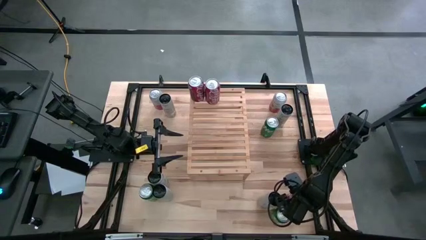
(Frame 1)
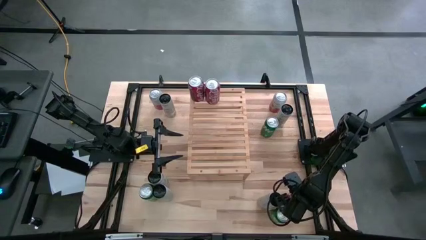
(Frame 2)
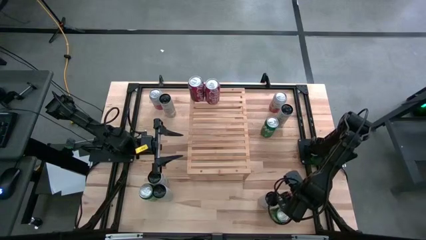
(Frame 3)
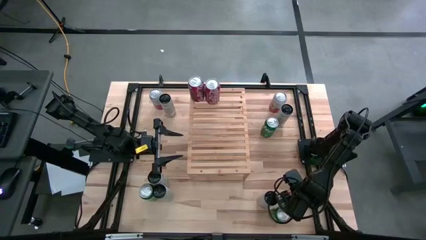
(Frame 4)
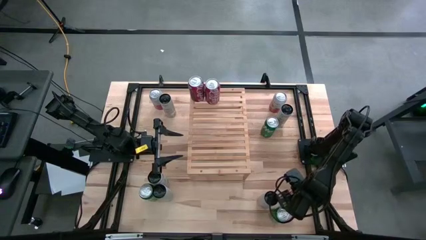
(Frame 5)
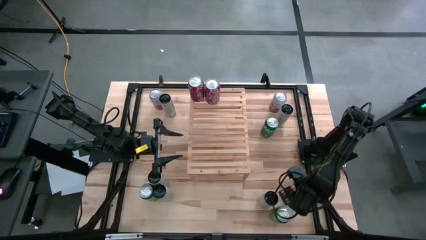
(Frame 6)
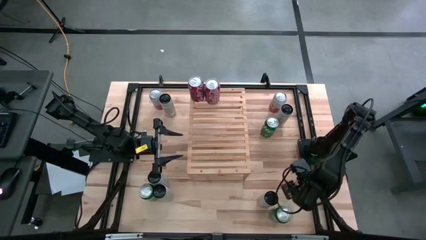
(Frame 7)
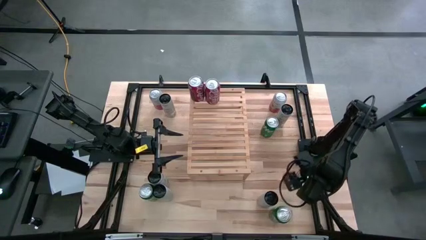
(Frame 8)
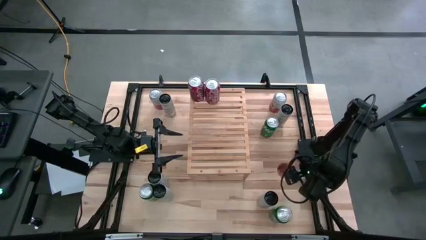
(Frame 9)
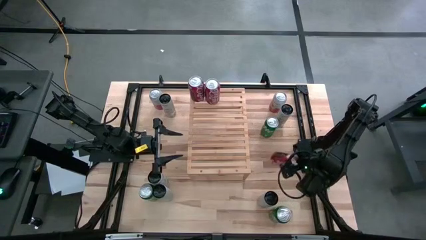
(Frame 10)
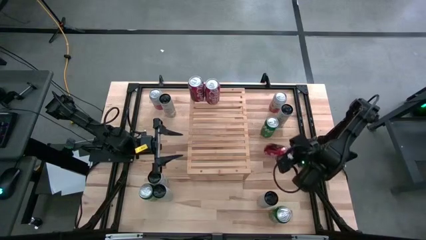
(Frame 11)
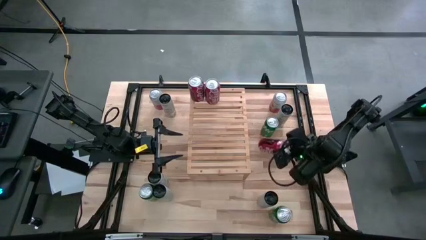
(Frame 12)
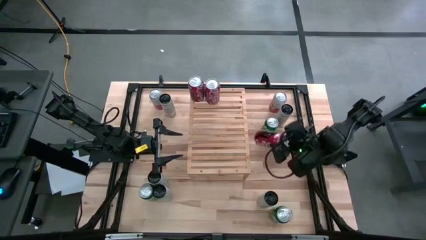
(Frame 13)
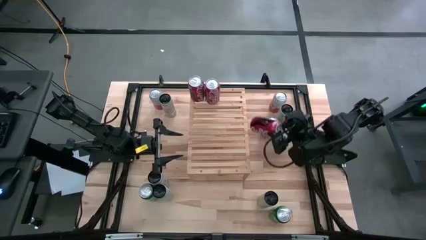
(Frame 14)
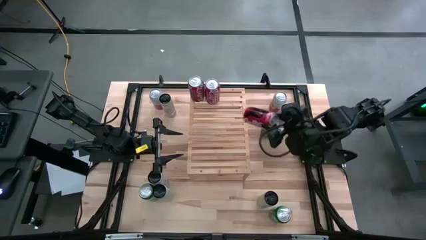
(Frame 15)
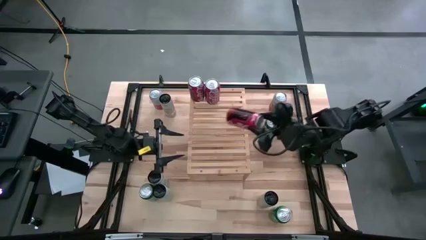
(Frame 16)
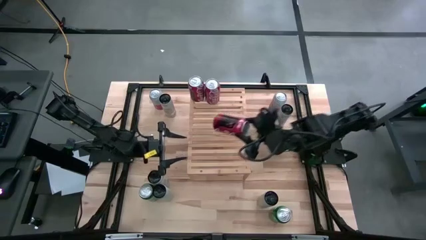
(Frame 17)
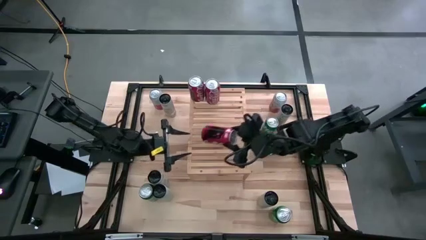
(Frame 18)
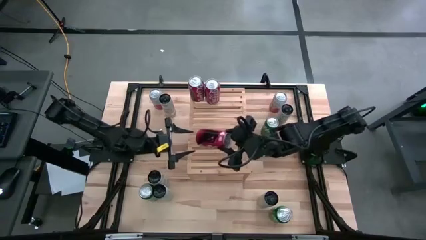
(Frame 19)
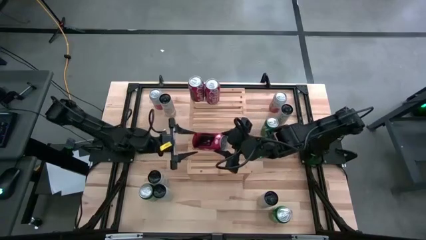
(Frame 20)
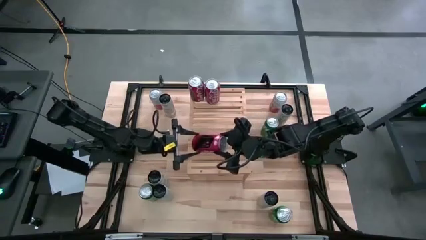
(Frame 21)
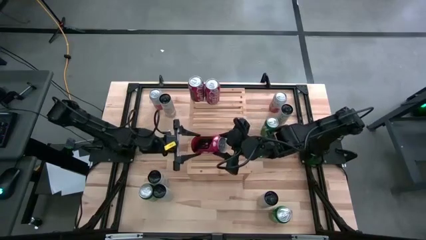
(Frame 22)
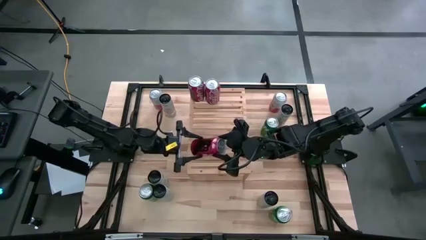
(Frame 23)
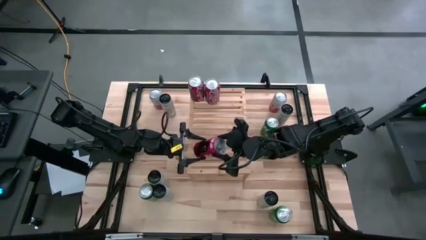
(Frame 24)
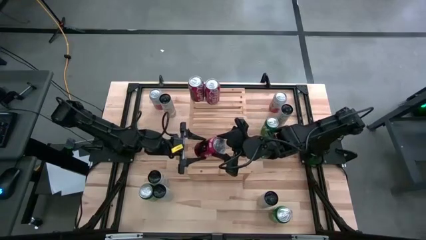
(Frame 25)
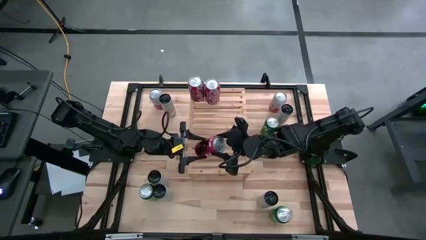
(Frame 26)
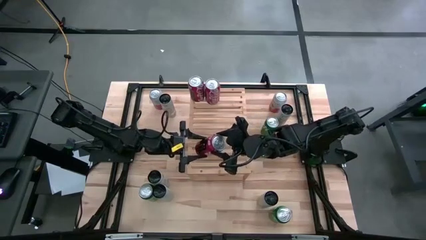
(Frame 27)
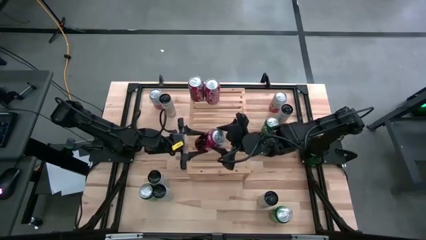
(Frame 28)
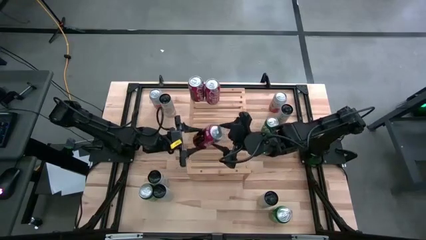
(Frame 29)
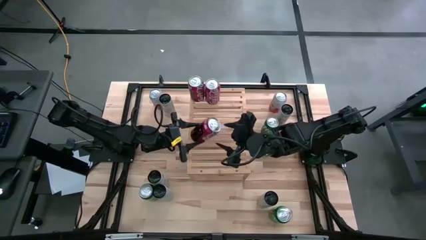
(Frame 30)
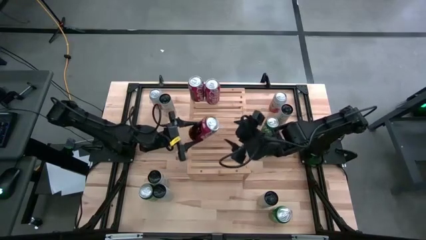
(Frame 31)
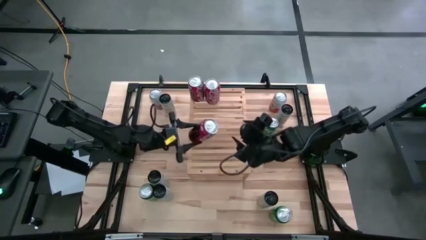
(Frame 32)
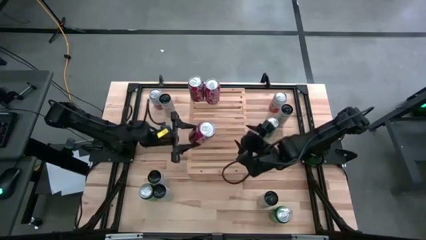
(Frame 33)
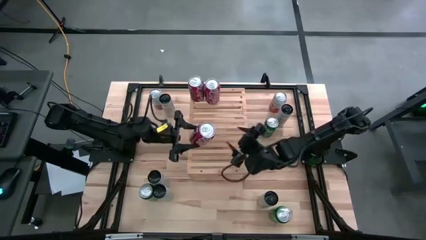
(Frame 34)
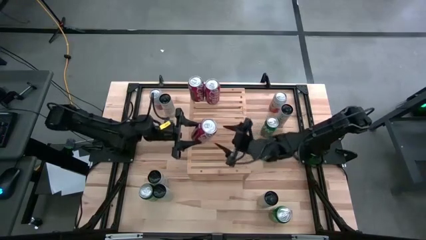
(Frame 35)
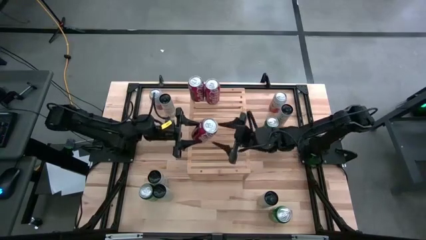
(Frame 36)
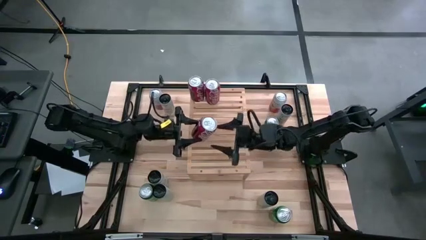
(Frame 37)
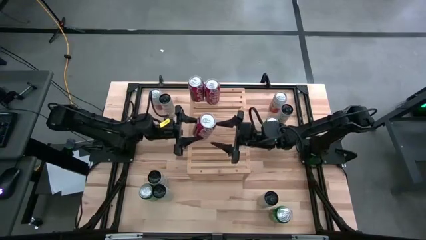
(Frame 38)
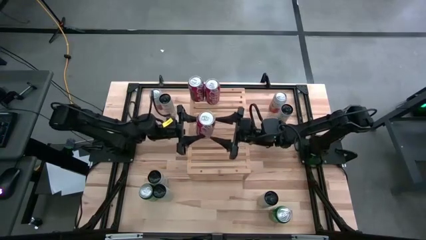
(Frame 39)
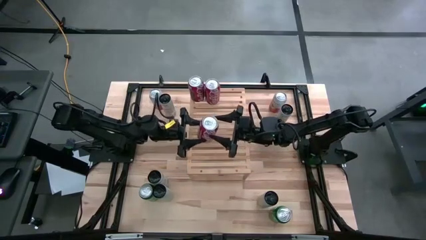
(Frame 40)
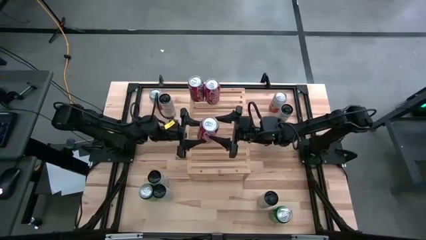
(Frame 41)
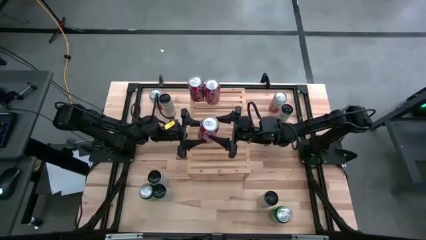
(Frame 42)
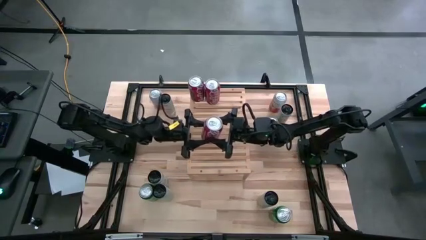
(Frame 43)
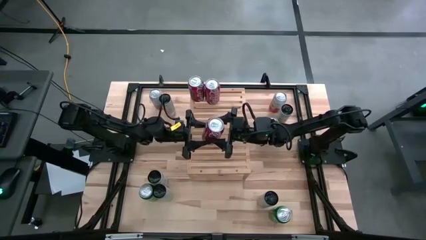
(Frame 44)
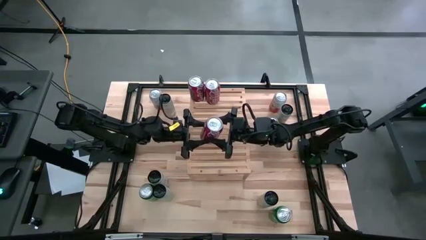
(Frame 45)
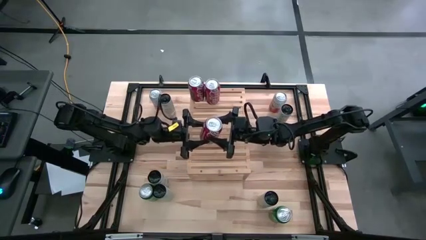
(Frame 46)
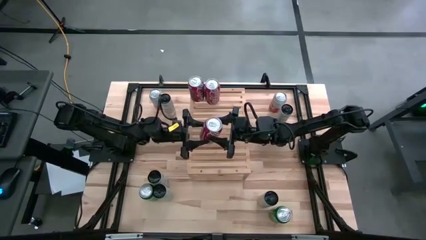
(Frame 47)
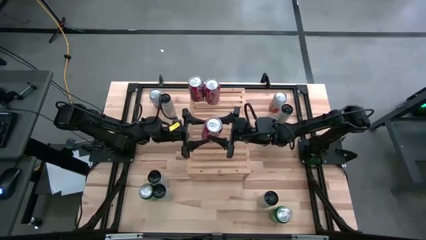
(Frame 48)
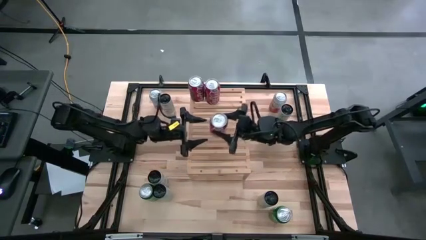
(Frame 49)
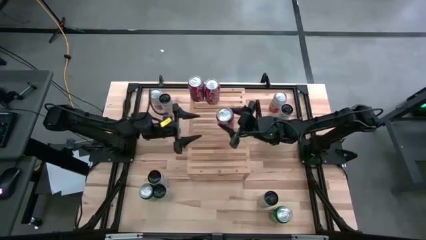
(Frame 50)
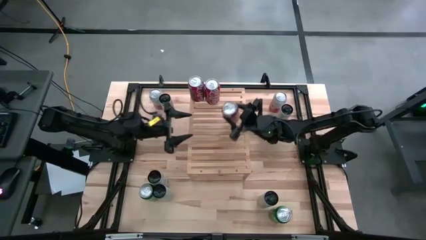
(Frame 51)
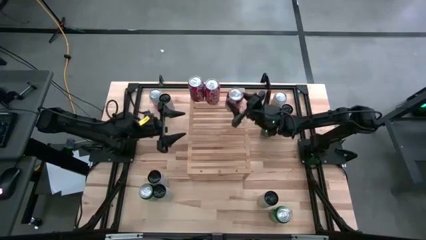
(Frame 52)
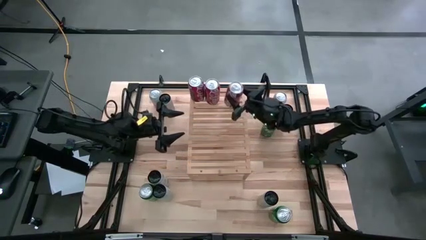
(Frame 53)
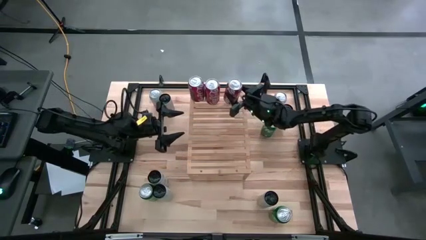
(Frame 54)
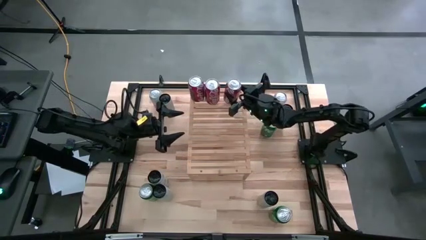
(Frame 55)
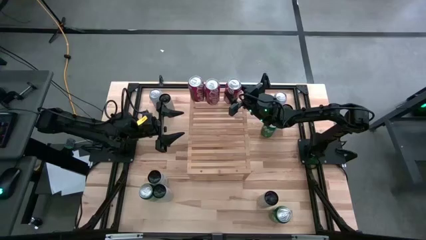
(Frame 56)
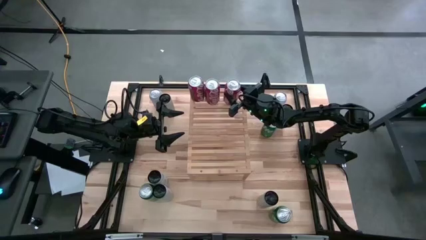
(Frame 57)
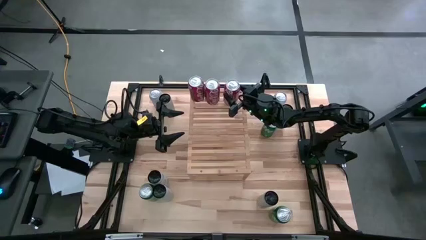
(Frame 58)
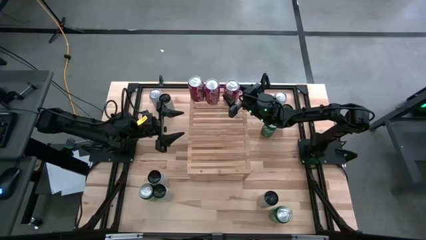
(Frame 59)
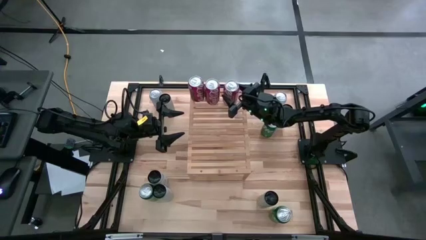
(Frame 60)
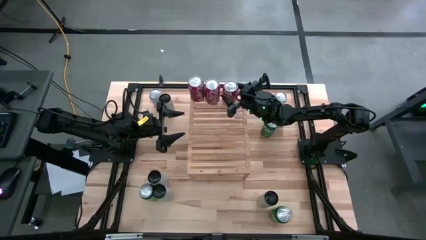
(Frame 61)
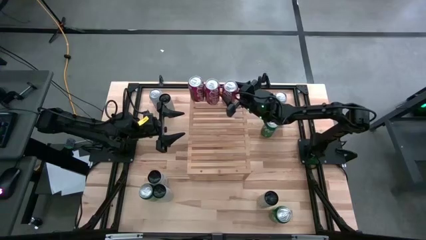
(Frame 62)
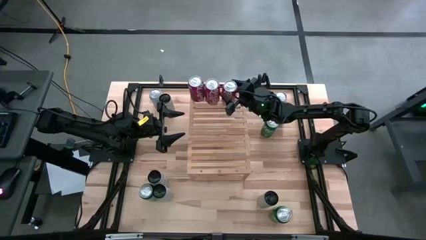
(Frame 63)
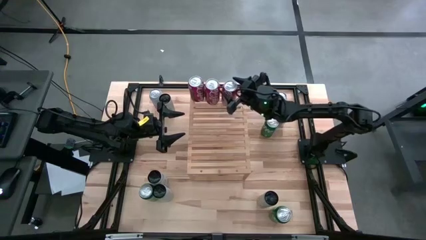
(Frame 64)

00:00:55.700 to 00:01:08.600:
Task: Place canned beverage on shelf
Align the bottom right coke soda can with the other coke soda can on the shelf
